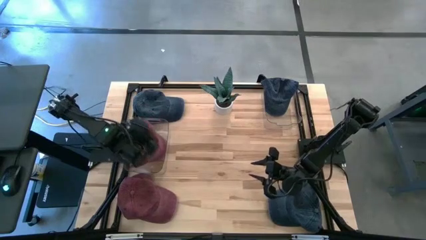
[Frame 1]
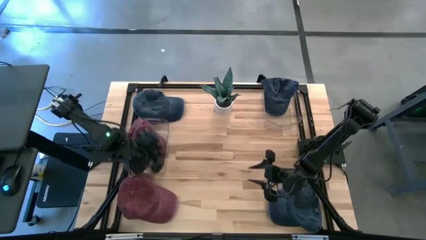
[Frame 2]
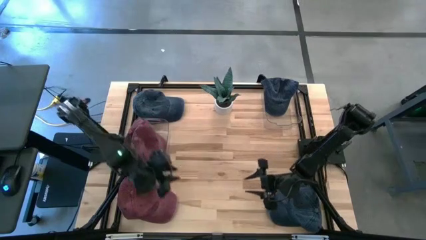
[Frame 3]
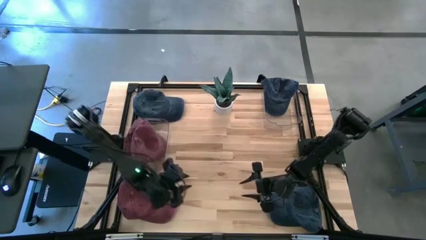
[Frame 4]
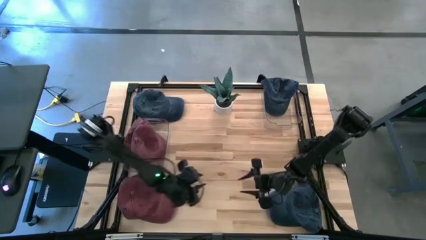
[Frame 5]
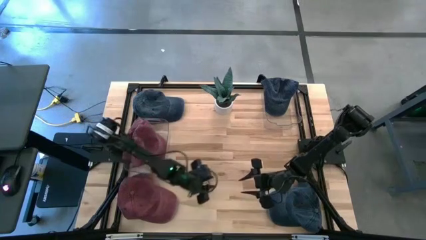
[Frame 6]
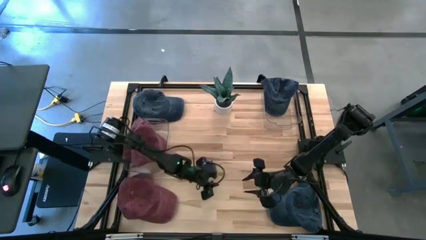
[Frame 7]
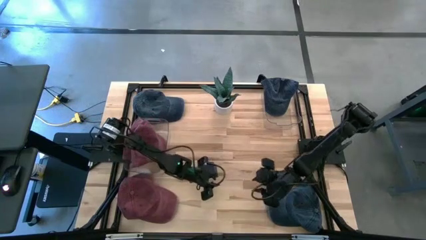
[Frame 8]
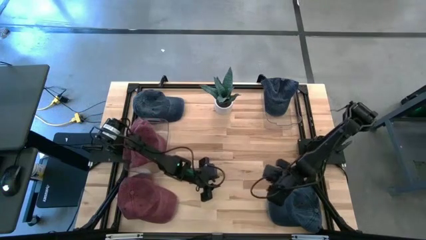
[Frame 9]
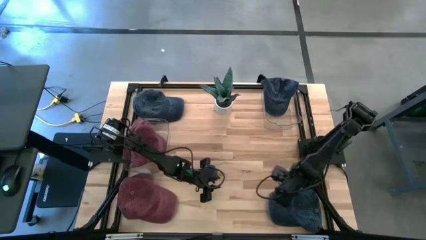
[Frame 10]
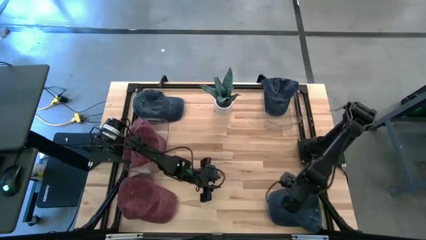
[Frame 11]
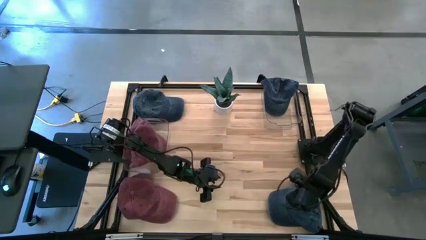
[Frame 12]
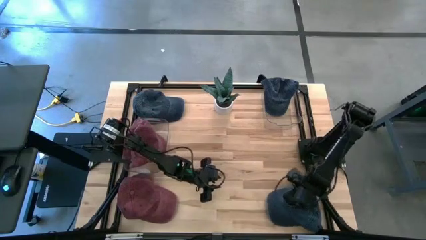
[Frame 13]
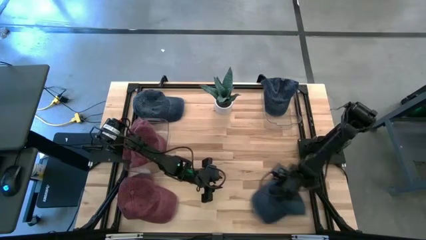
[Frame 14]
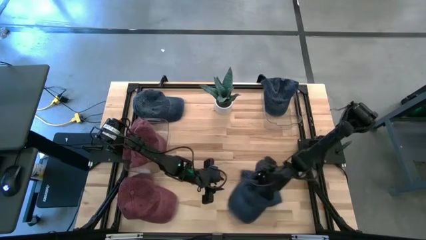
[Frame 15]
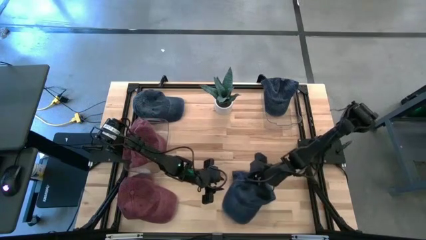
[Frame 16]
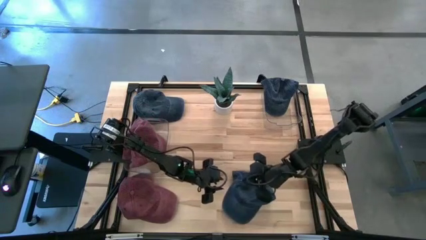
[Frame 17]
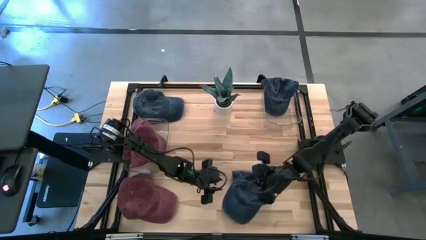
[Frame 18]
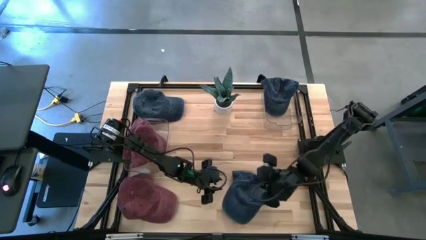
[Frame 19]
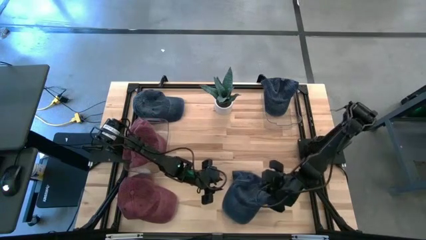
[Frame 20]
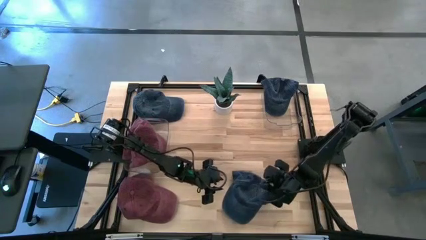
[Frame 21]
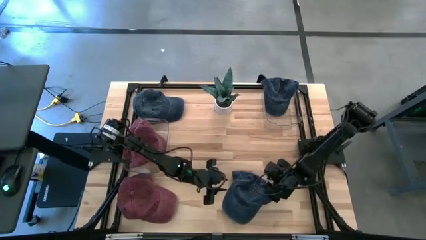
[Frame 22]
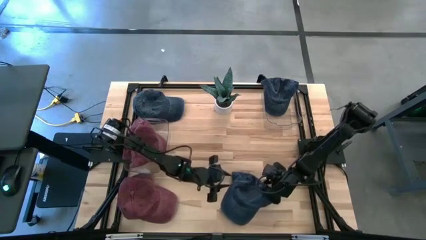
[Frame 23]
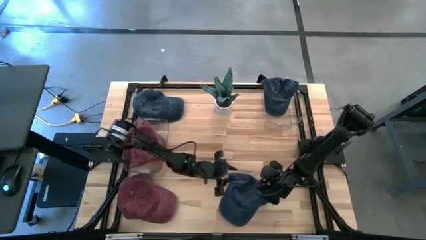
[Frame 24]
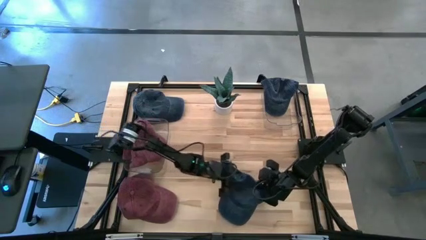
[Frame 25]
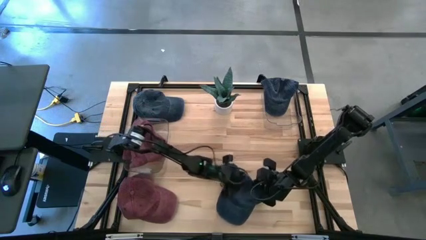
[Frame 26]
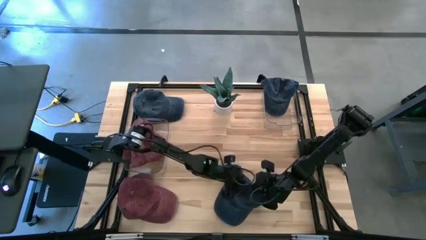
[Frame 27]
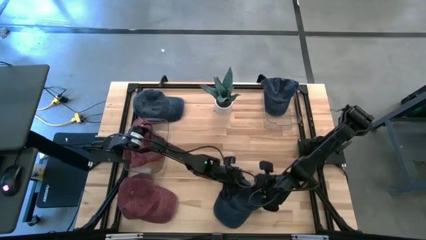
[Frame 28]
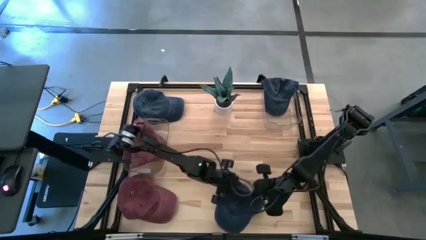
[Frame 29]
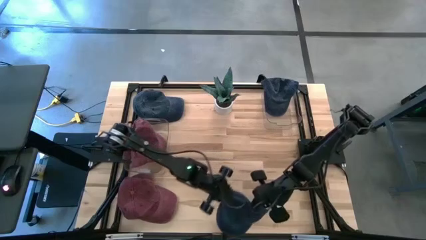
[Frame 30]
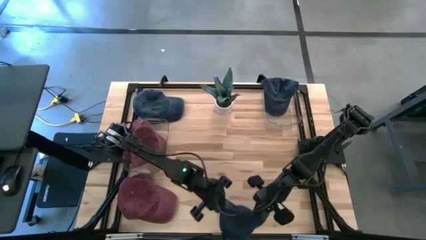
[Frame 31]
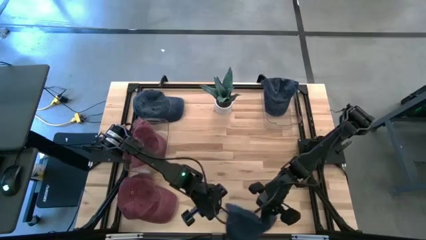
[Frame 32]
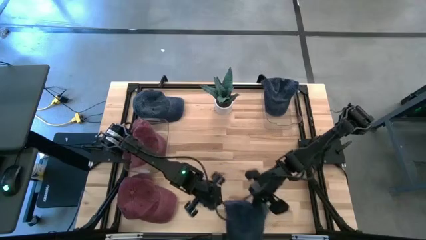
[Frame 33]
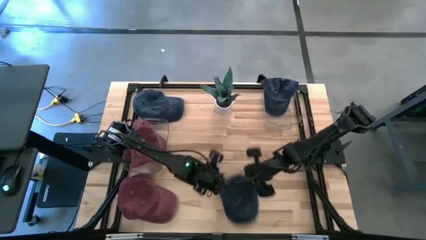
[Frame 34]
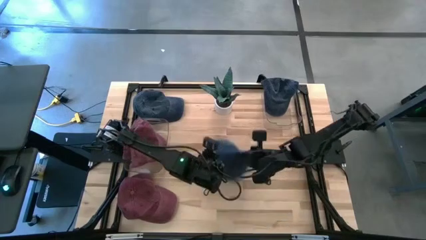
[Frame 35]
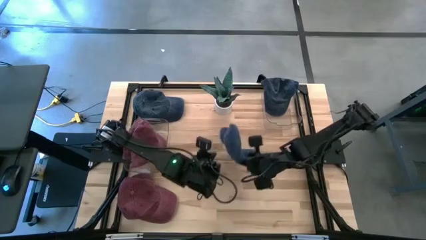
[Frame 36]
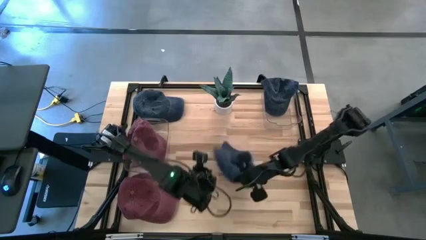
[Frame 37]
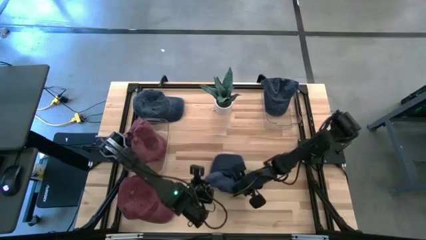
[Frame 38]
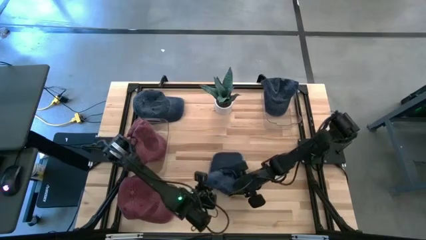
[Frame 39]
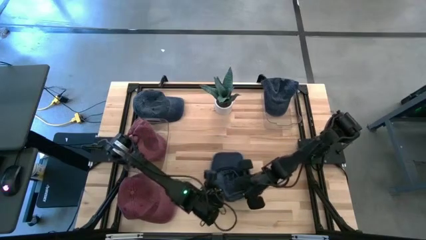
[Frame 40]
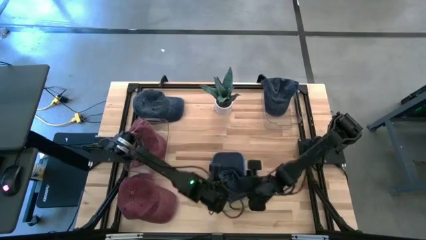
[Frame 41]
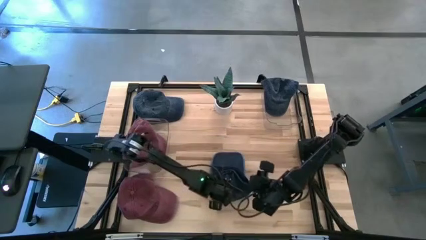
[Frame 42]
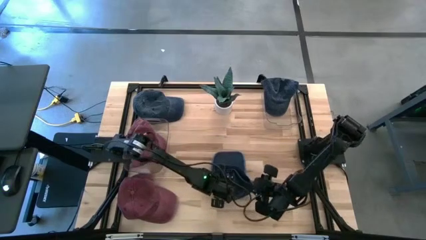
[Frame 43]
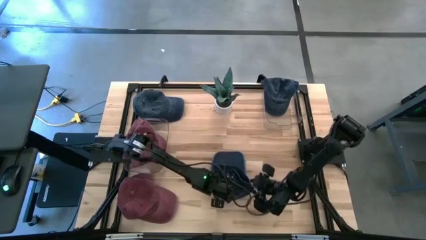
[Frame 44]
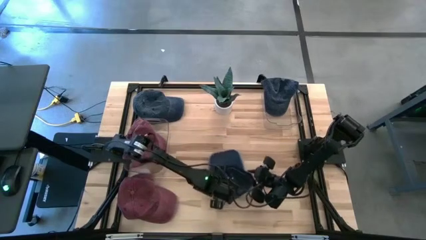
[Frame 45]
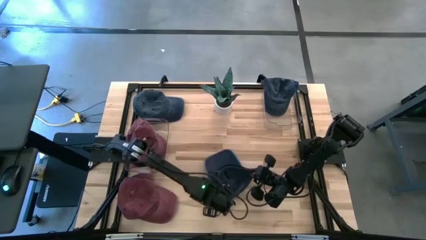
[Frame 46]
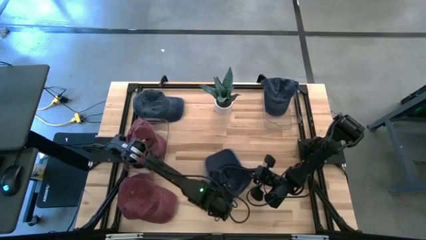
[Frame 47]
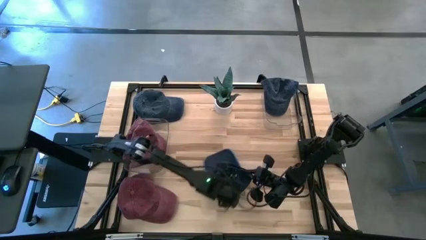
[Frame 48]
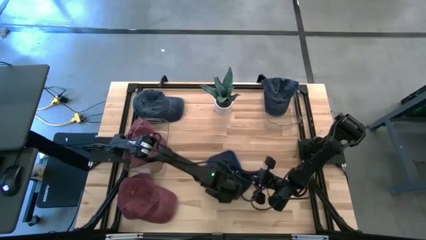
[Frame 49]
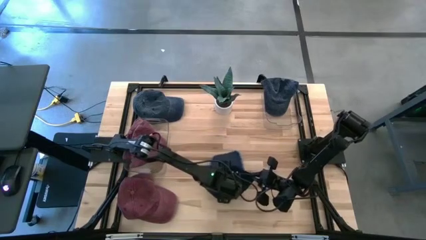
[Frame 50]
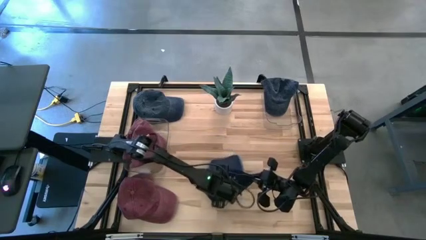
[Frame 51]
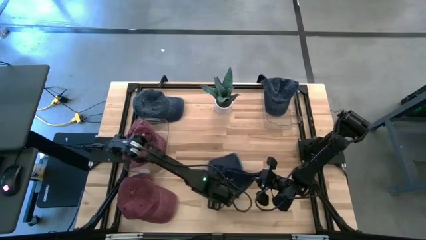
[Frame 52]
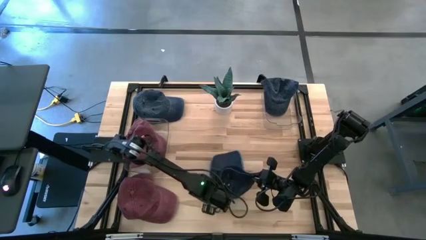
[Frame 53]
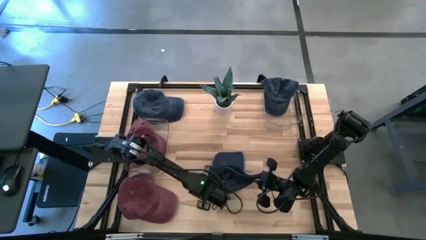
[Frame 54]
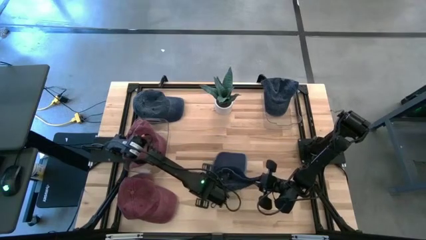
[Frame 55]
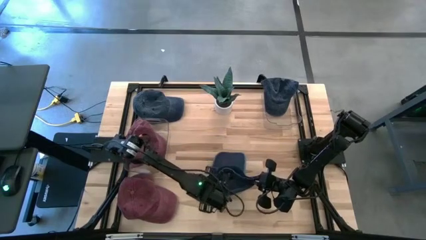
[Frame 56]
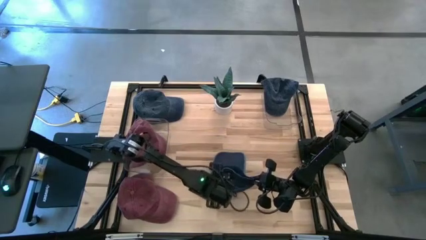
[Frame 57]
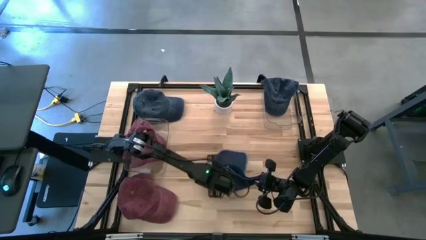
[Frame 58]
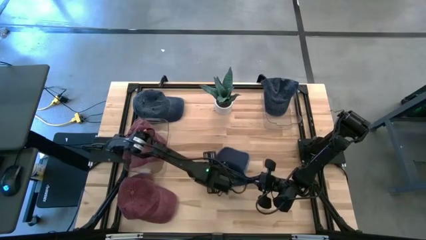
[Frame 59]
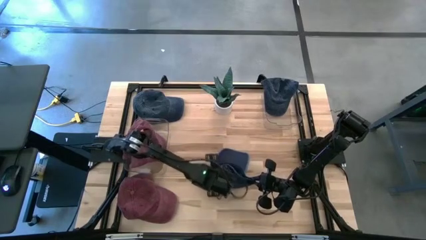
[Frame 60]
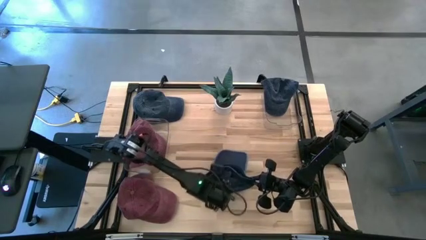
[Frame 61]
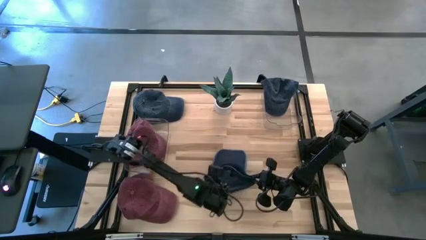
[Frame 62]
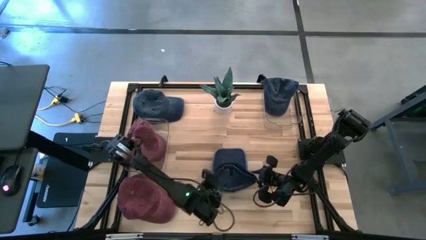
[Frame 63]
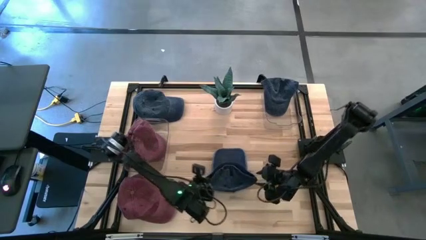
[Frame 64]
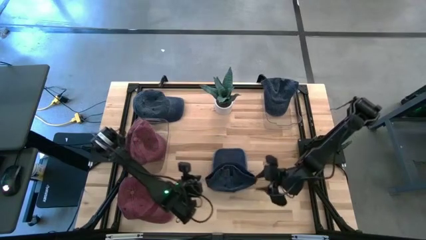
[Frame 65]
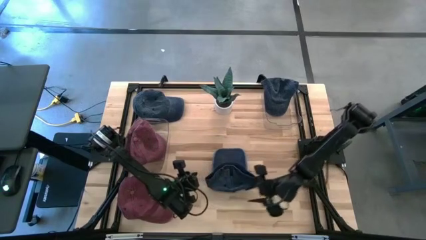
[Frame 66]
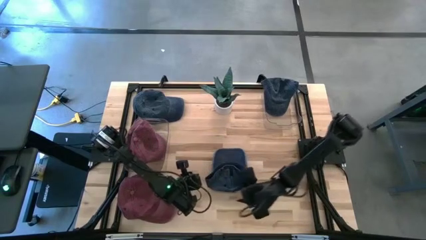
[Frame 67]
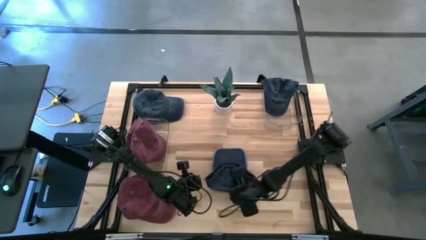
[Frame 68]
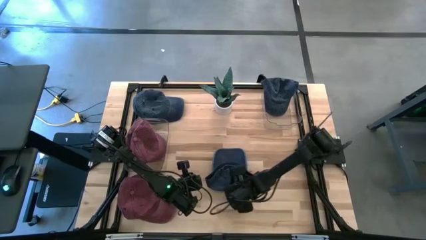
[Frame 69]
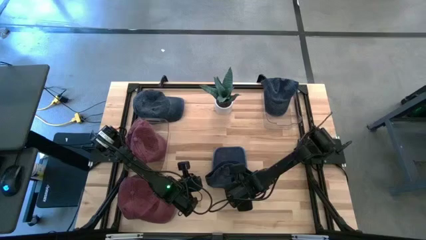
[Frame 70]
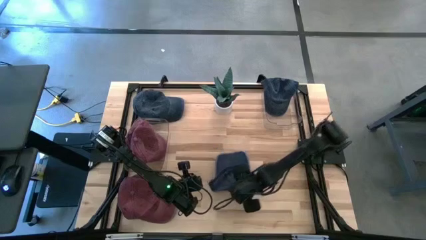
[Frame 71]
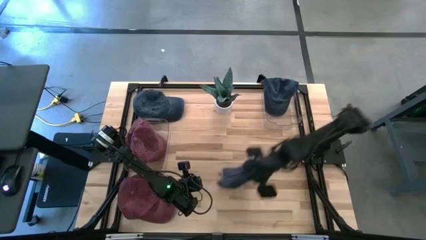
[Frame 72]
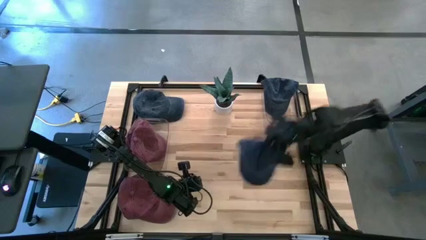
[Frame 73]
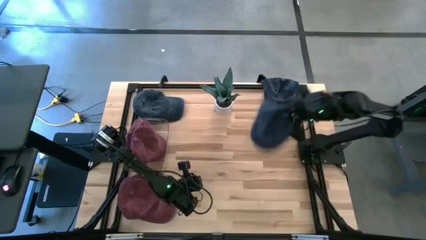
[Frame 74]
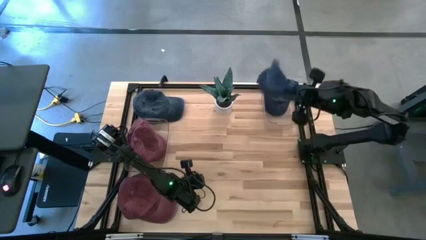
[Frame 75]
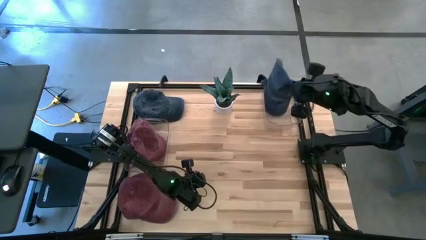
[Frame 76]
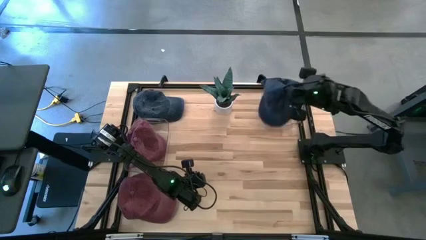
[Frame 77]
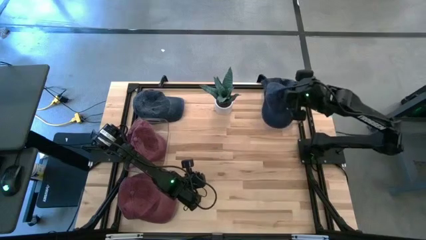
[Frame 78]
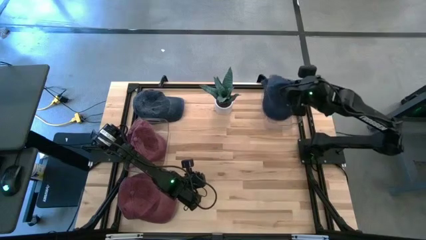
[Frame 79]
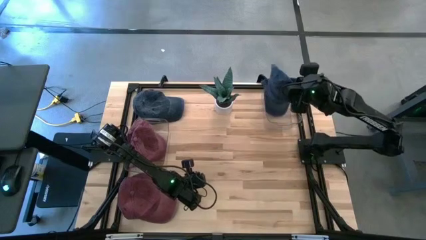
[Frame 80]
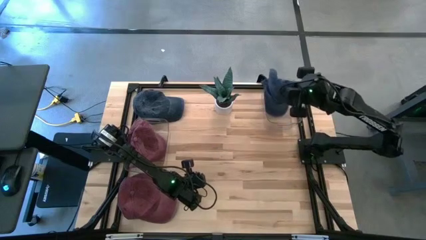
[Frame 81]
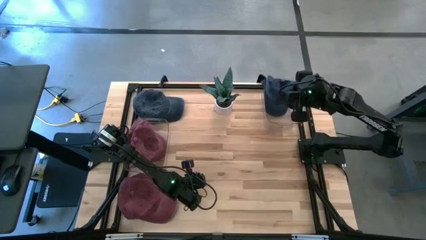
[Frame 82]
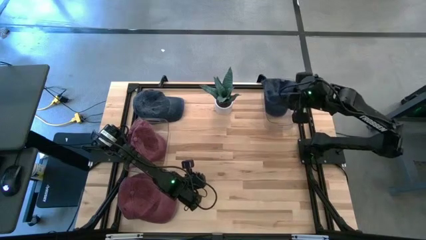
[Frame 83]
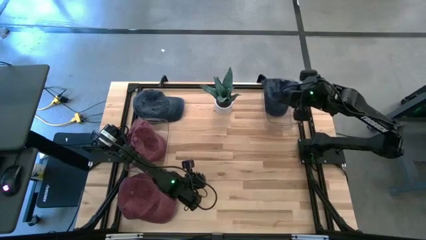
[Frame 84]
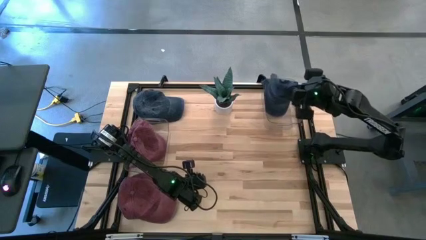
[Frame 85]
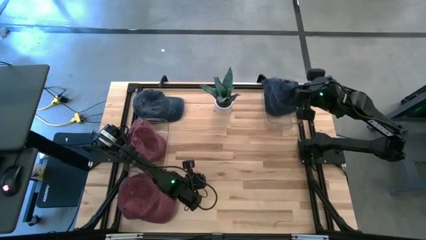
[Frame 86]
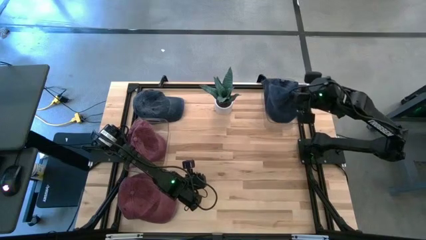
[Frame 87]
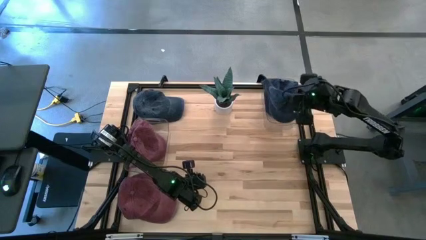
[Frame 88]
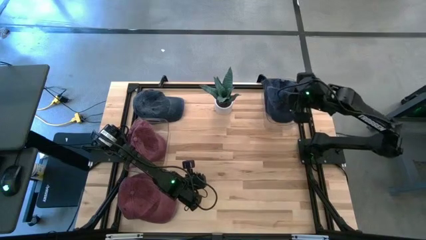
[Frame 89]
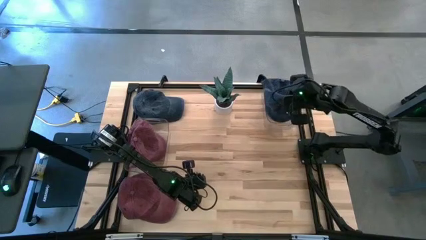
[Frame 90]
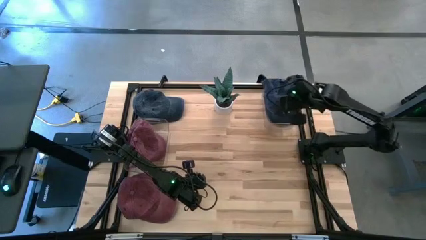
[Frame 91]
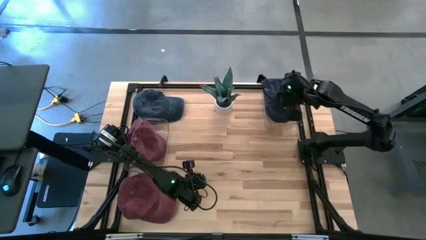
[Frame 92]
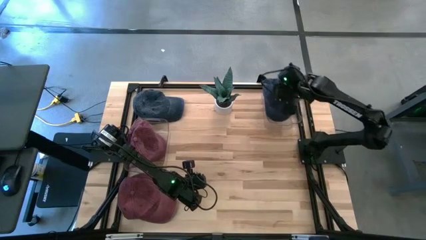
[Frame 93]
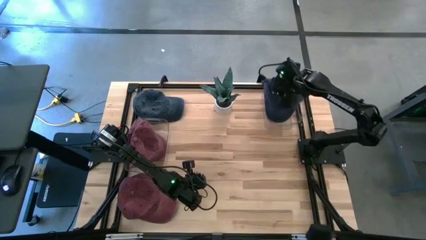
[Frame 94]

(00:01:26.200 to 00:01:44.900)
Task: Pick & Place hat
Put the bottom blue cap into the right transparent bin
